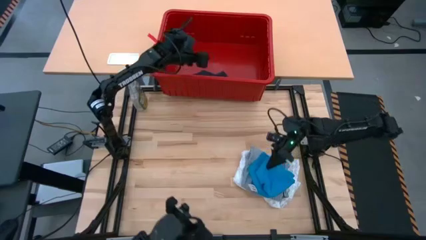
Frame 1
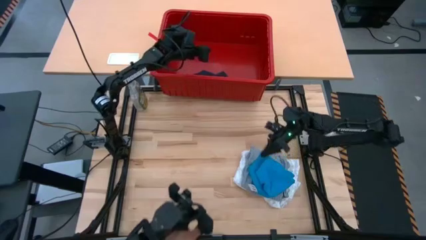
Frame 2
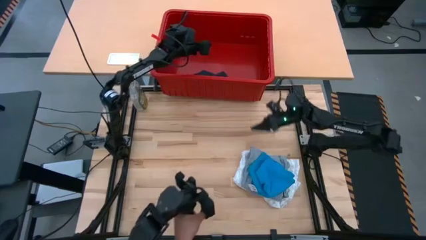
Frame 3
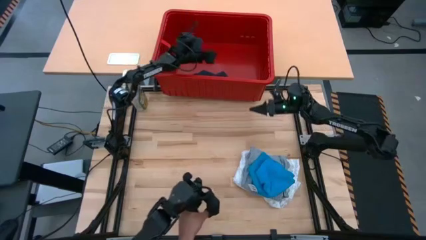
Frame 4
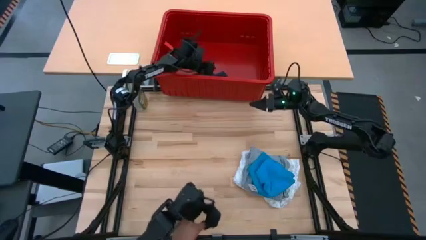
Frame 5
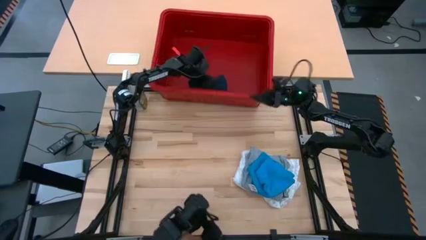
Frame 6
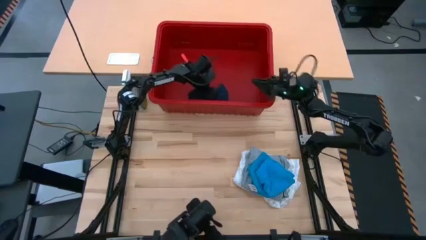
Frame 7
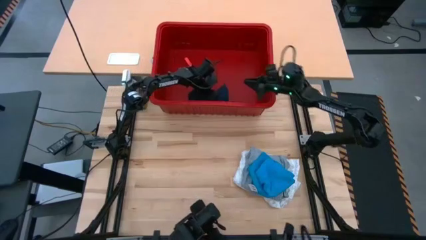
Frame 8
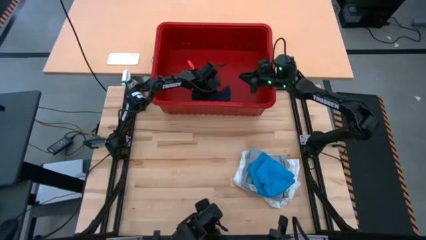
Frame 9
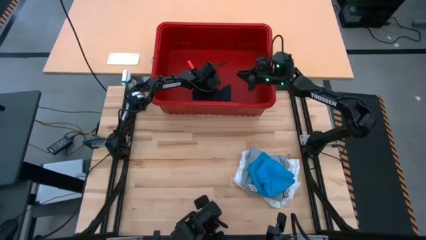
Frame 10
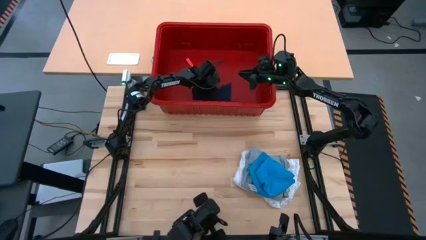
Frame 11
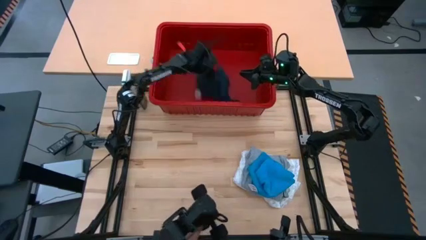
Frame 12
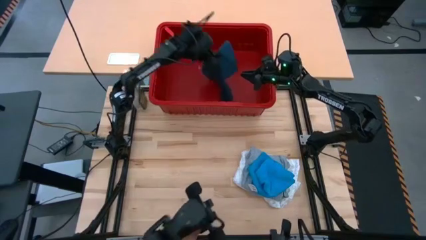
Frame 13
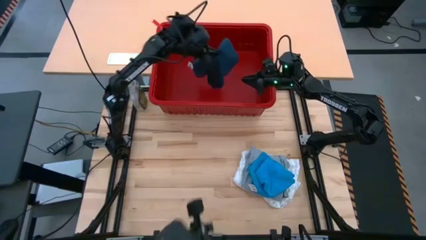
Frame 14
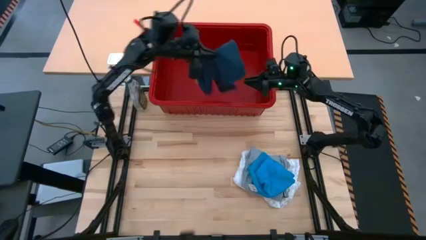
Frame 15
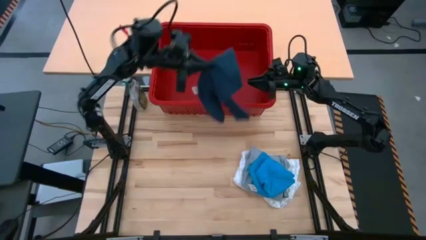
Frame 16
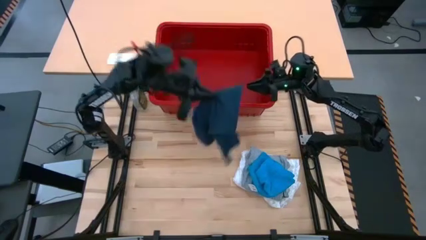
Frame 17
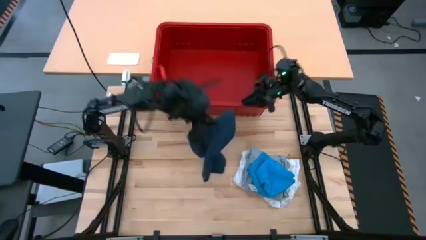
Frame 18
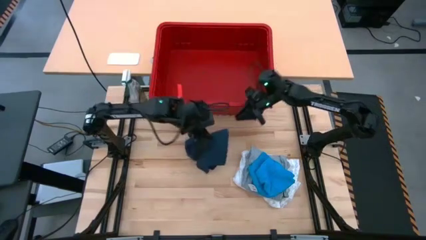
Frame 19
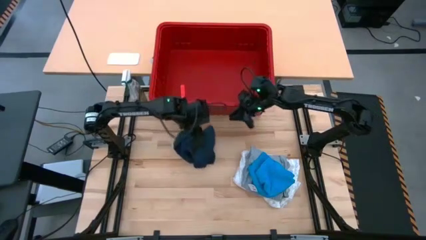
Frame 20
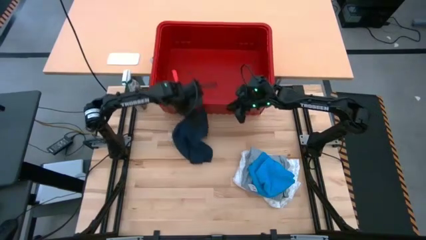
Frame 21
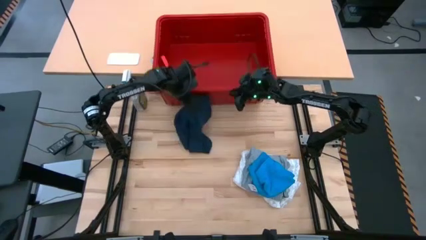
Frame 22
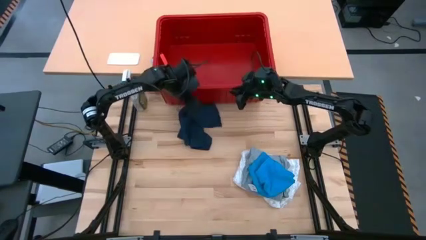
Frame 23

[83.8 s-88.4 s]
Task: Fold laundry
Remove the blue shorts from the red laundry bin

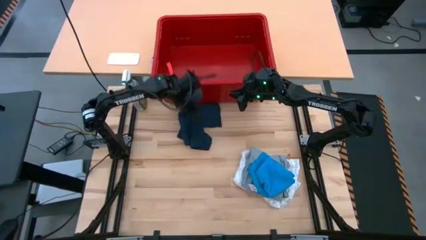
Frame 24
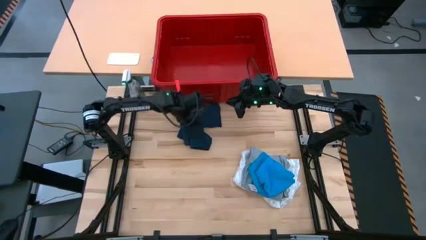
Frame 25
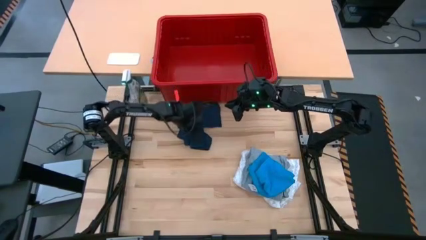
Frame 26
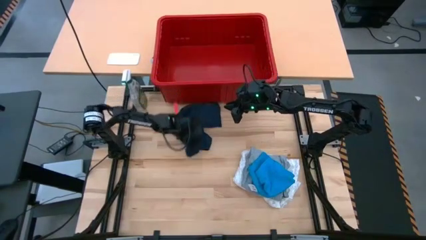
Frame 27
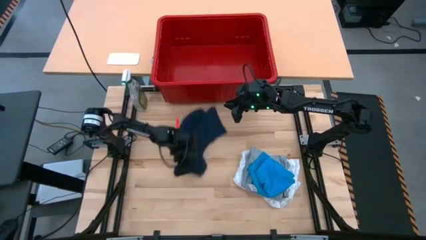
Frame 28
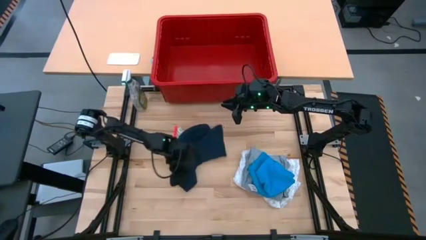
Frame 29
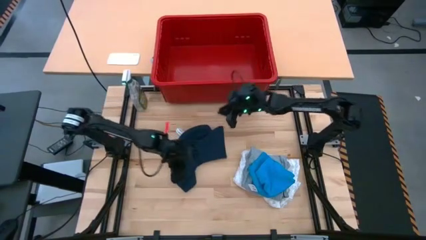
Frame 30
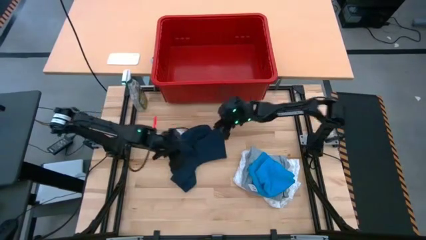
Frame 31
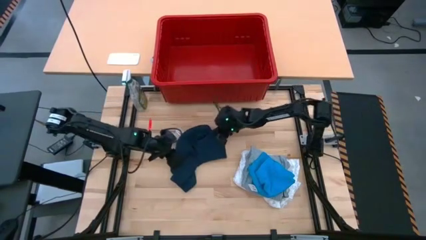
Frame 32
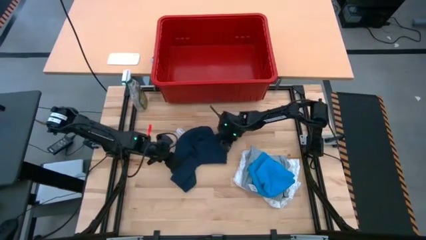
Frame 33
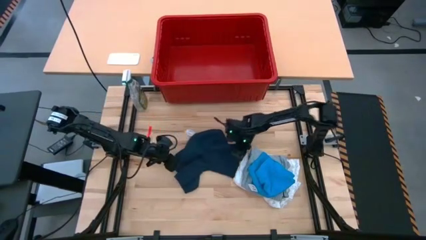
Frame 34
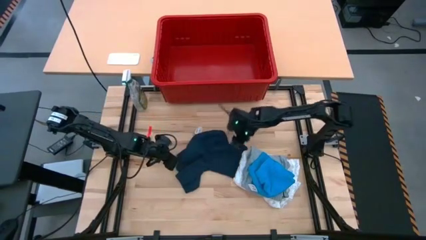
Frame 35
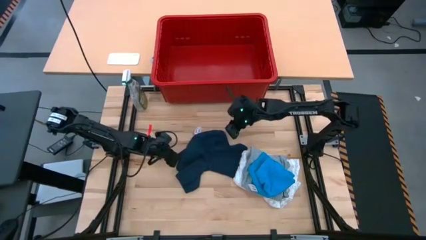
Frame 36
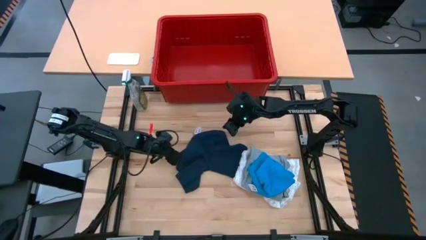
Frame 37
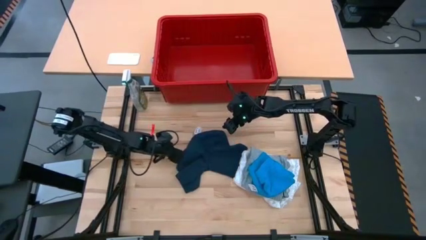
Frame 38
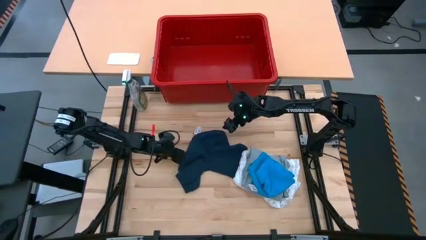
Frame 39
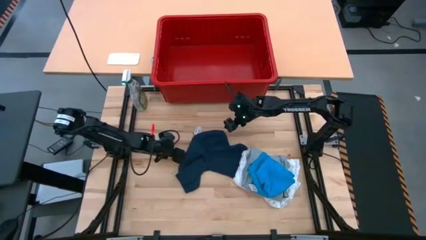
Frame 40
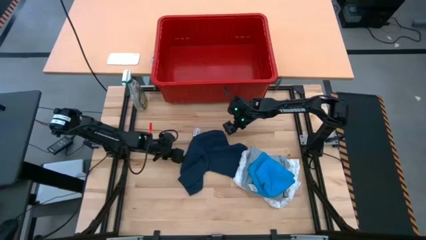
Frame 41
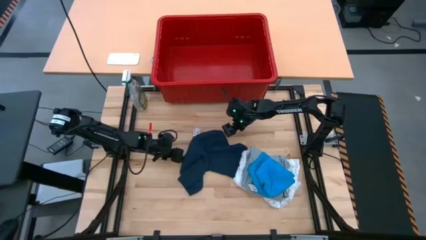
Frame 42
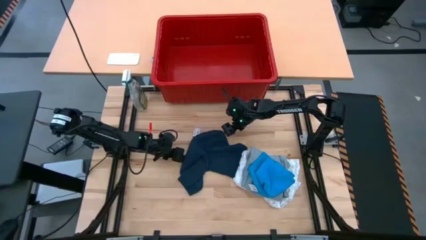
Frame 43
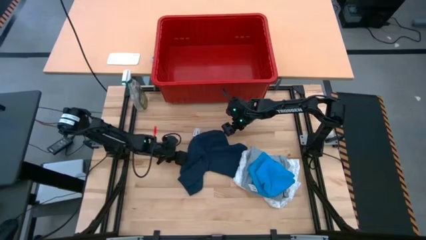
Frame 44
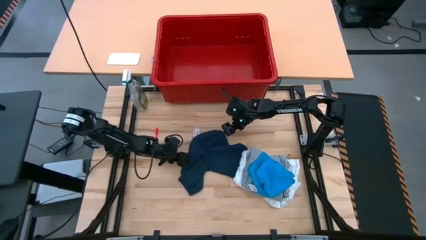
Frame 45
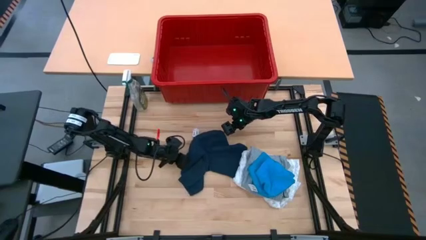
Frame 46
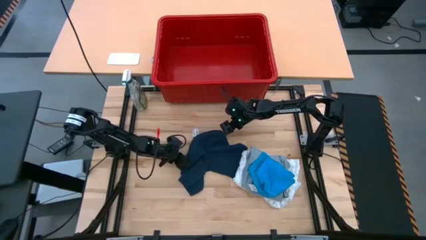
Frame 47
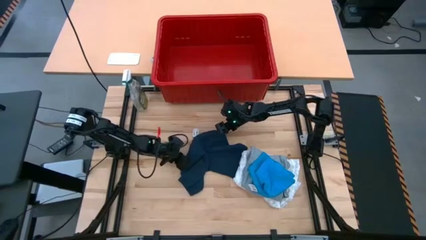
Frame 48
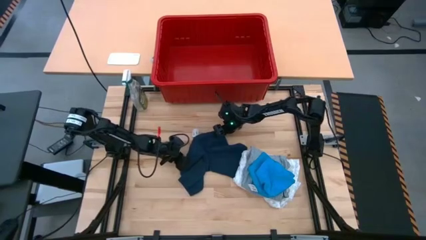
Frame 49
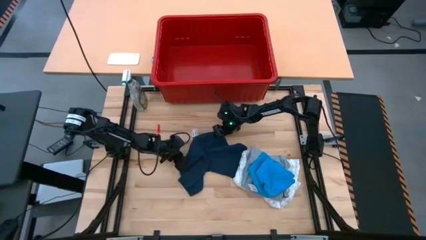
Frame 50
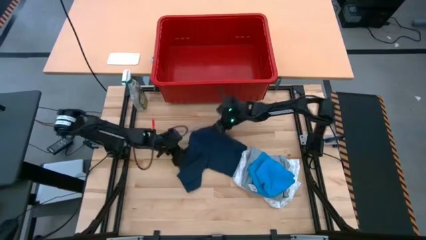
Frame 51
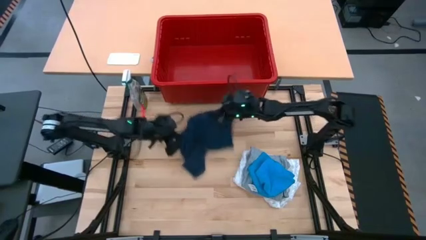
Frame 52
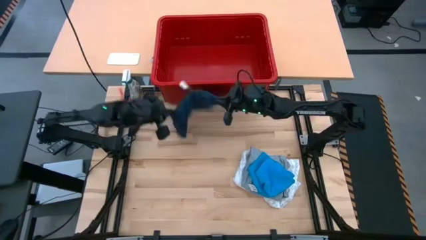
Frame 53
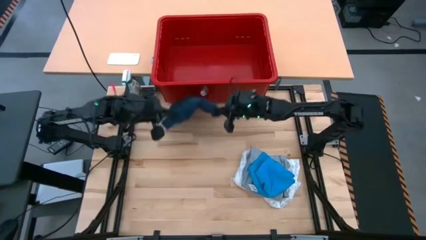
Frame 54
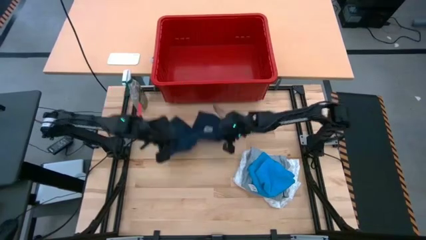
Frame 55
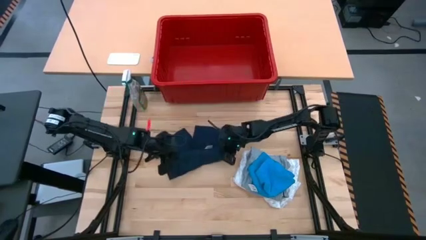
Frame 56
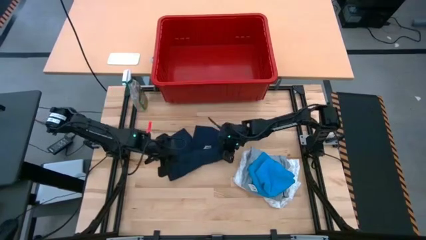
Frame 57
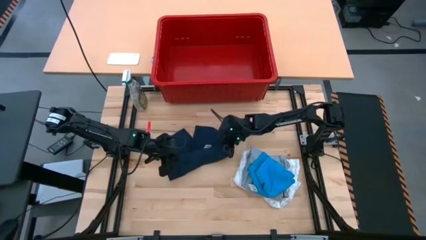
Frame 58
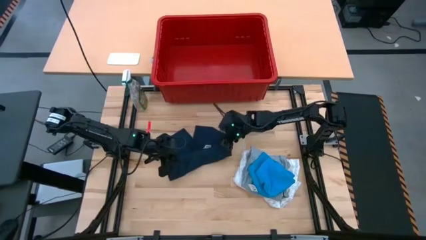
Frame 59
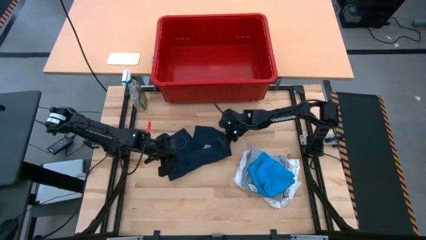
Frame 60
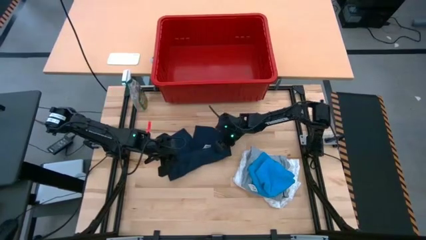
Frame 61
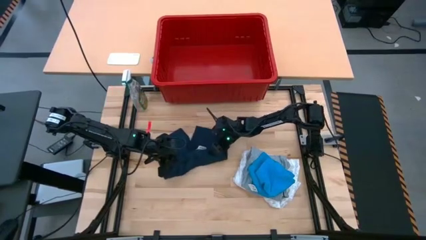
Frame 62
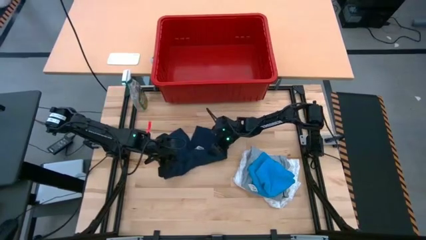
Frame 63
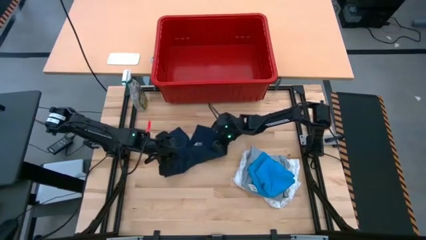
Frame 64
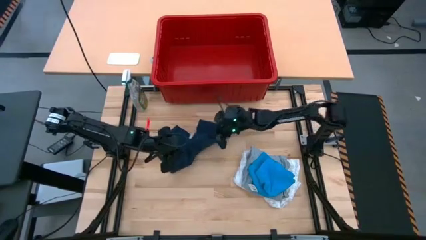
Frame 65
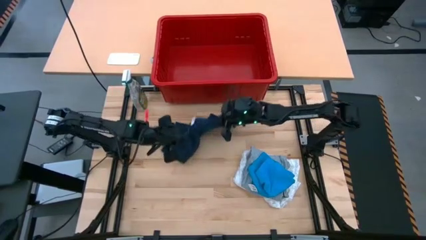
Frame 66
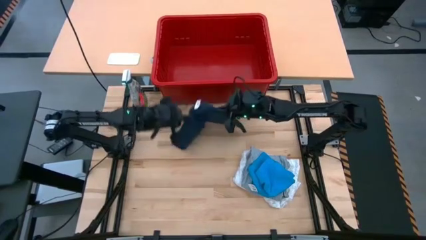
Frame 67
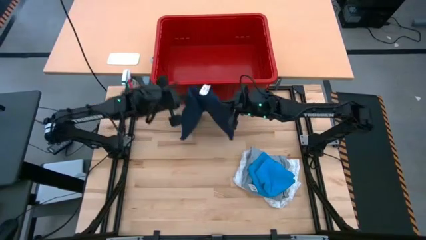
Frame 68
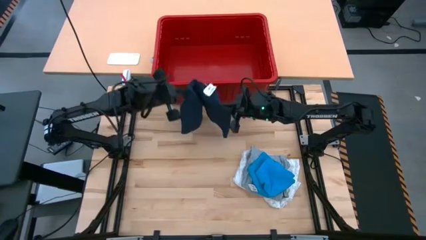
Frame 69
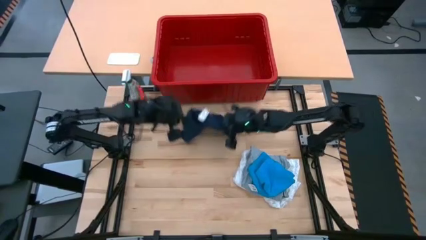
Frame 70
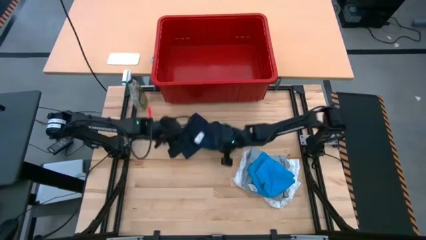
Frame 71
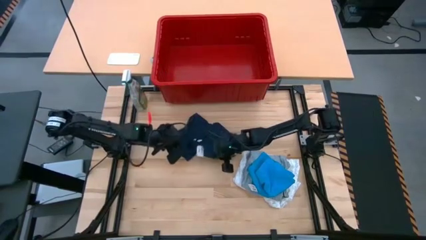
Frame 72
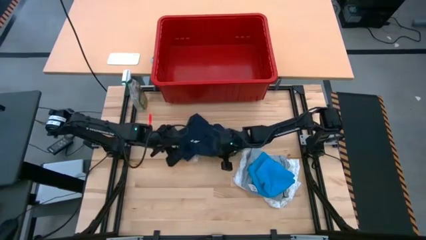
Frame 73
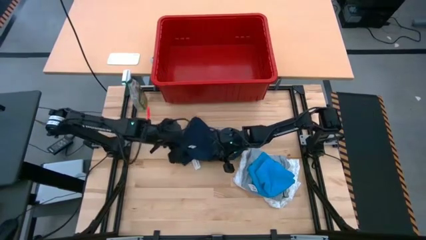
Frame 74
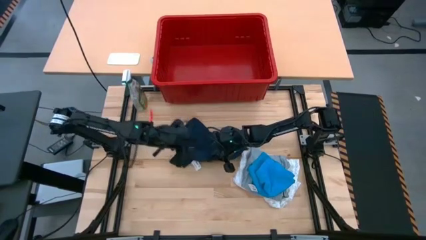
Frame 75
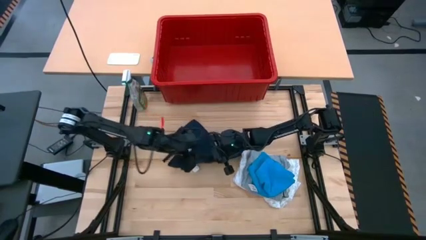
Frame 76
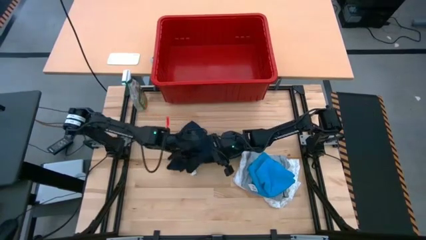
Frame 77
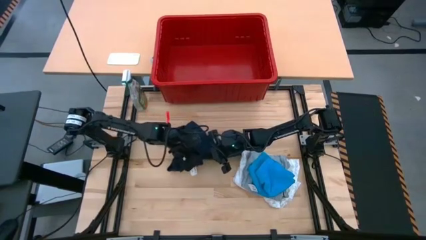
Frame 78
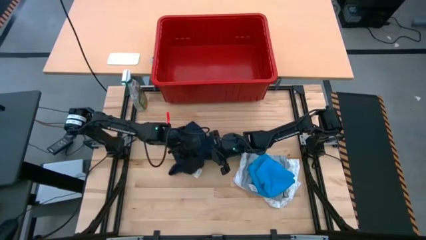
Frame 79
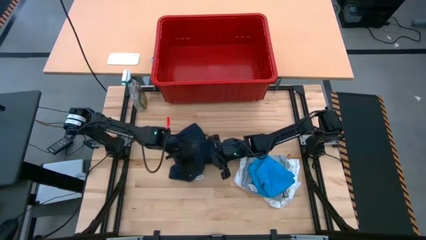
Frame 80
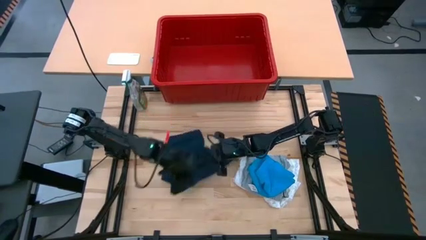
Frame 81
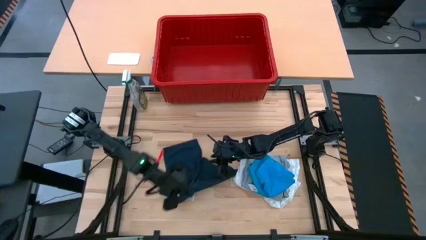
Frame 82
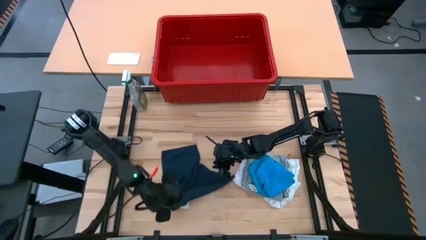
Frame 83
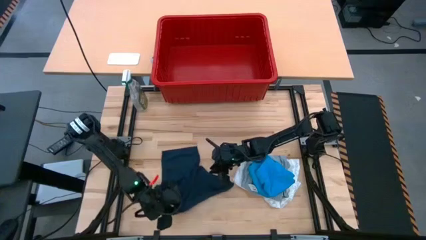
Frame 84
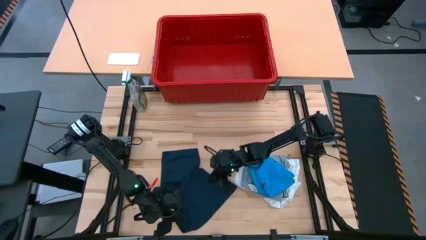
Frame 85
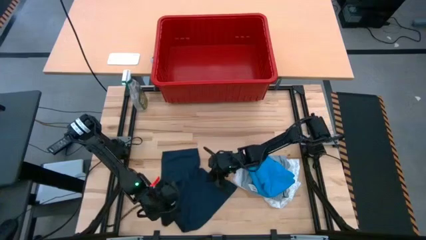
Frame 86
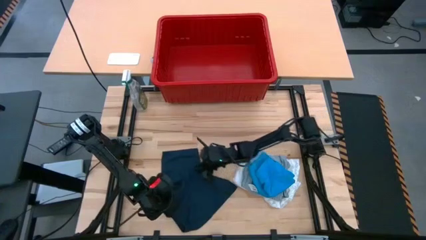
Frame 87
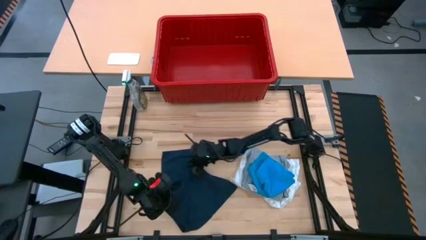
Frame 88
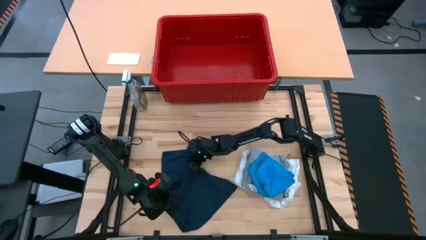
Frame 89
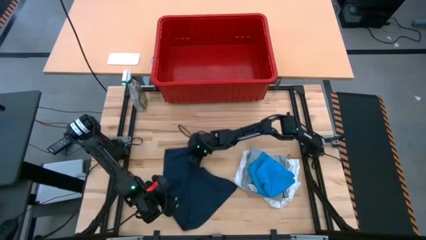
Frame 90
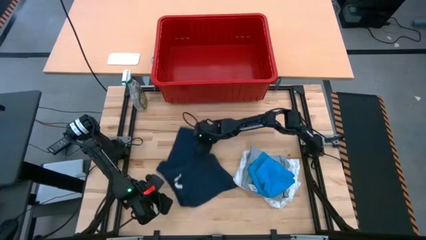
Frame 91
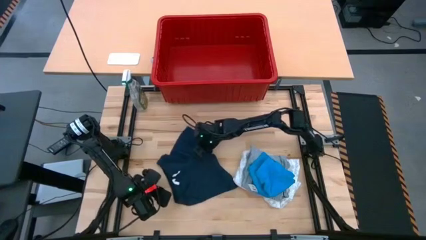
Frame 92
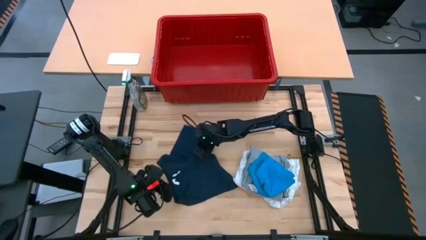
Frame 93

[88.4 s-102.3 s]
Fold the blue shorts on the table
